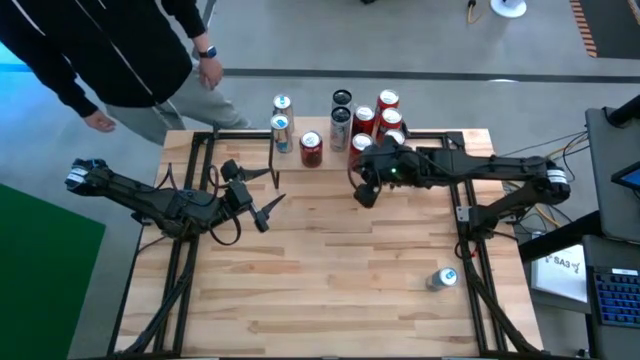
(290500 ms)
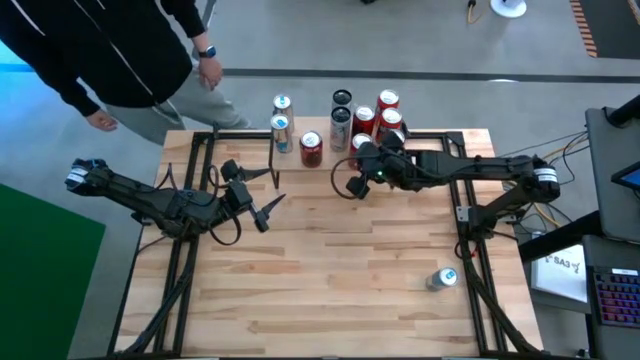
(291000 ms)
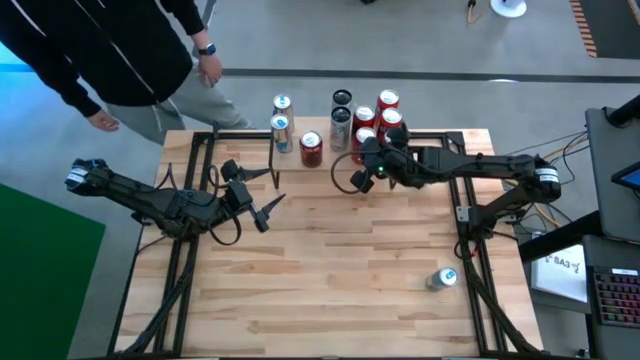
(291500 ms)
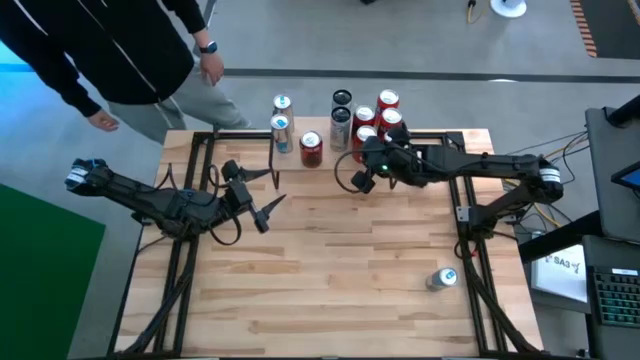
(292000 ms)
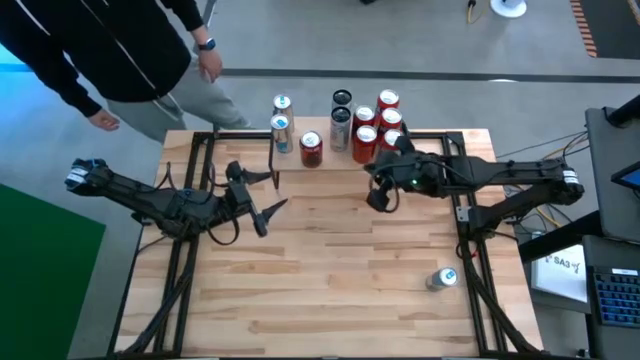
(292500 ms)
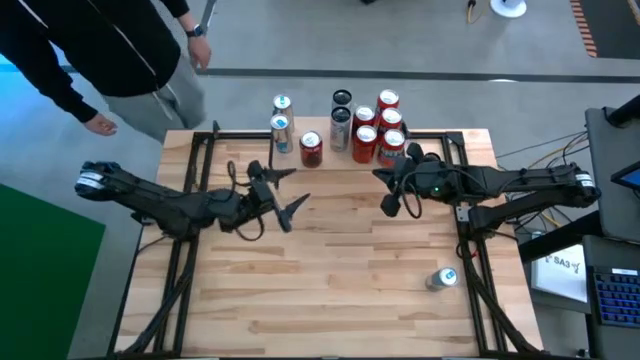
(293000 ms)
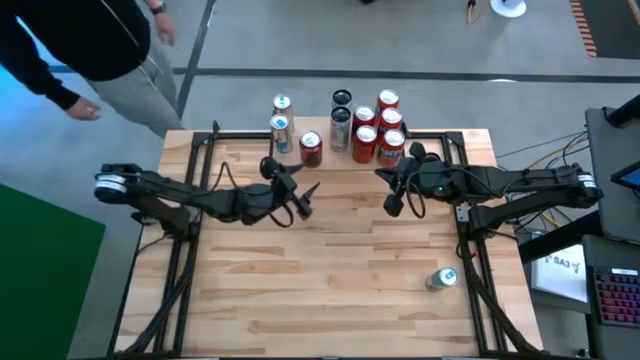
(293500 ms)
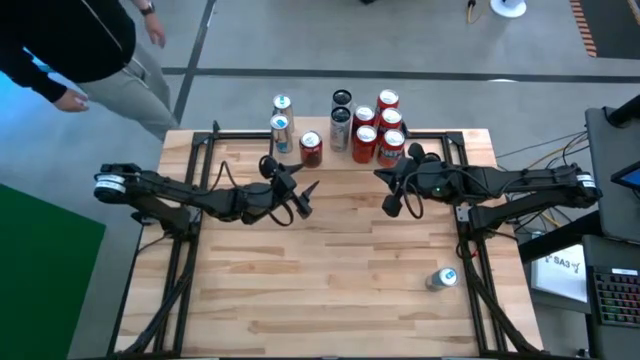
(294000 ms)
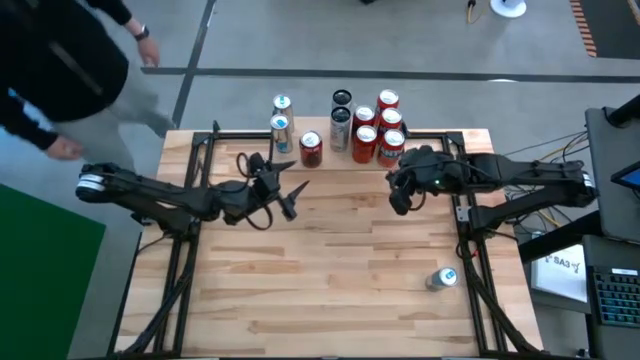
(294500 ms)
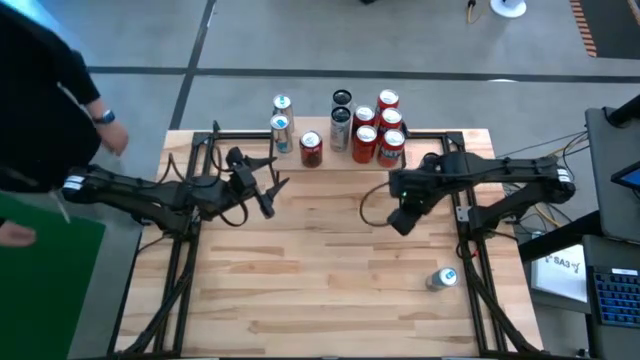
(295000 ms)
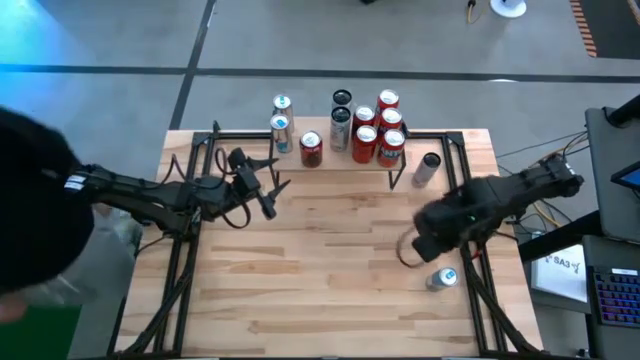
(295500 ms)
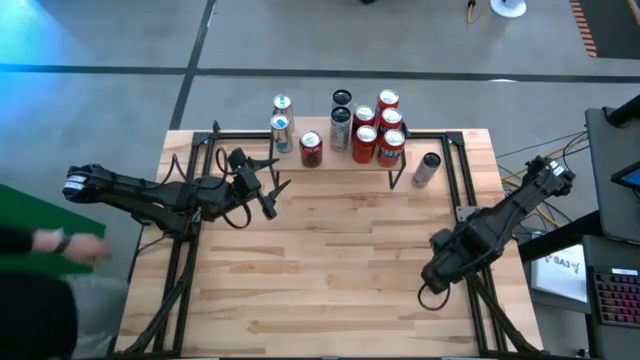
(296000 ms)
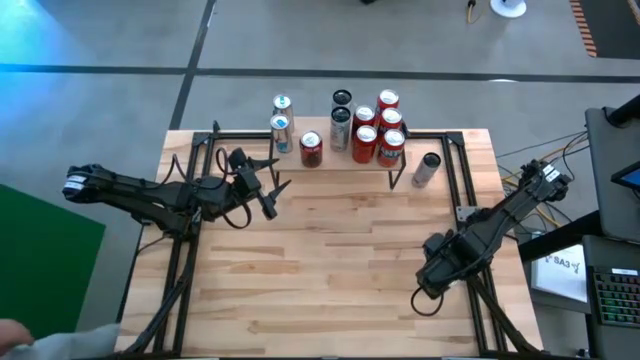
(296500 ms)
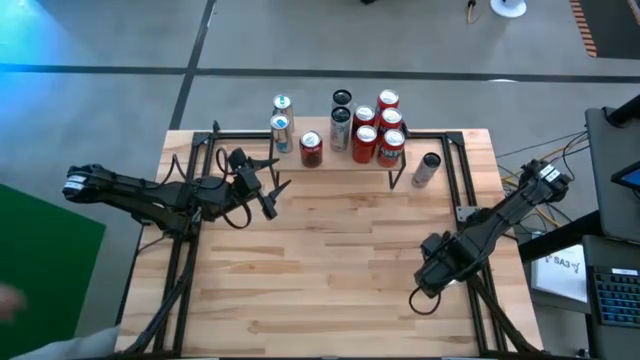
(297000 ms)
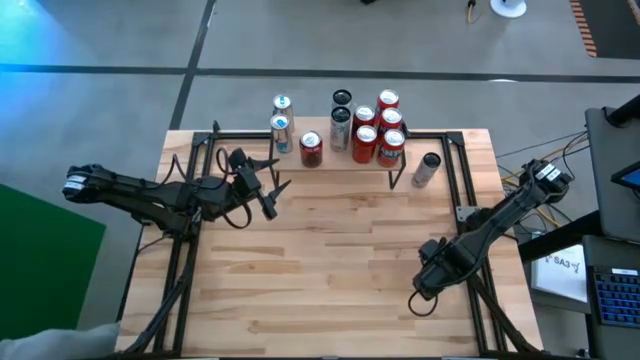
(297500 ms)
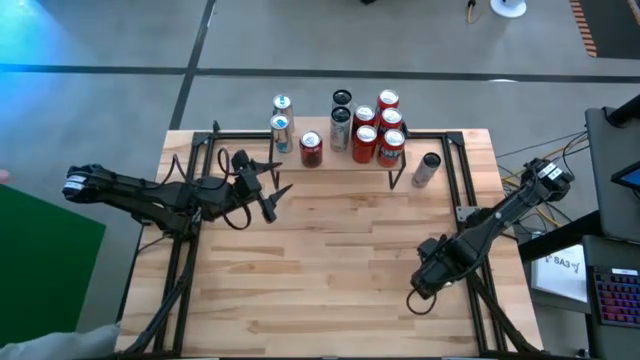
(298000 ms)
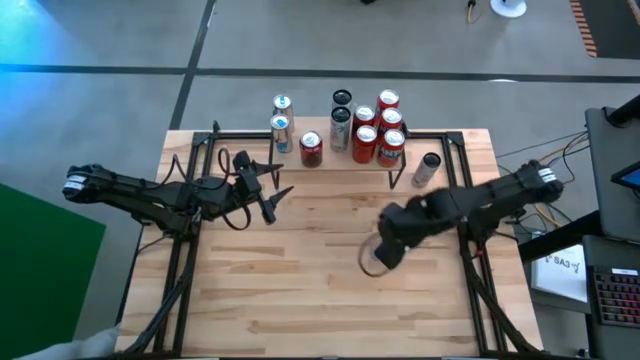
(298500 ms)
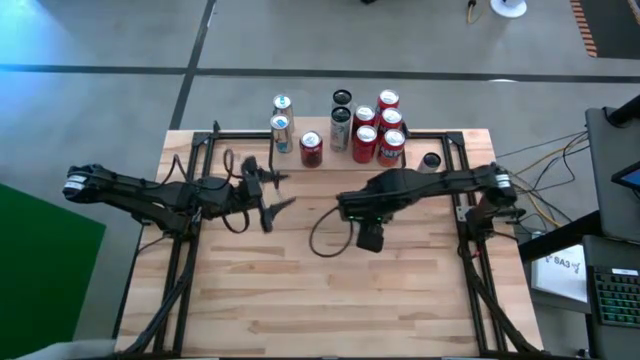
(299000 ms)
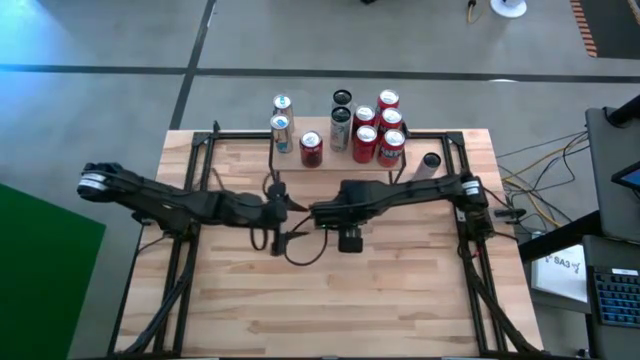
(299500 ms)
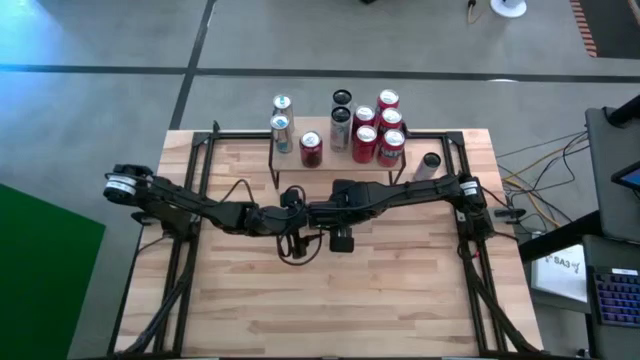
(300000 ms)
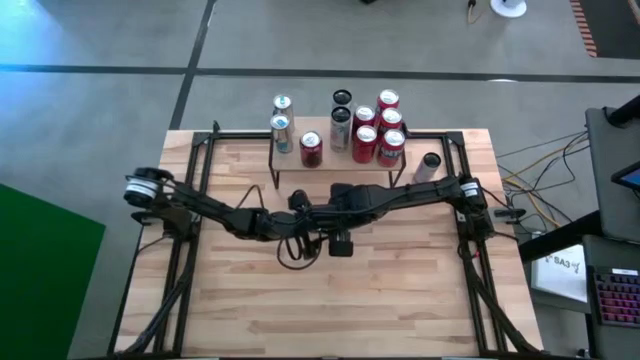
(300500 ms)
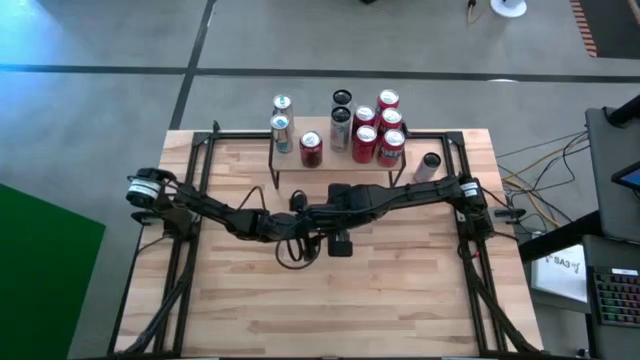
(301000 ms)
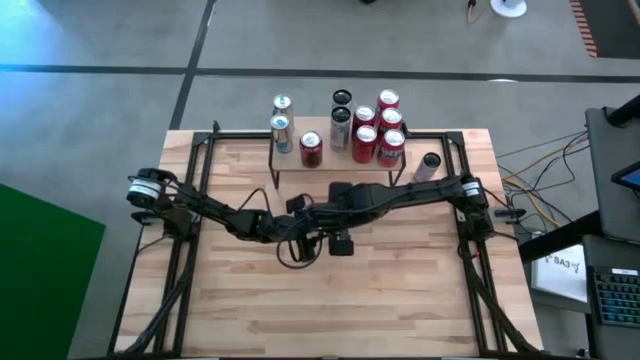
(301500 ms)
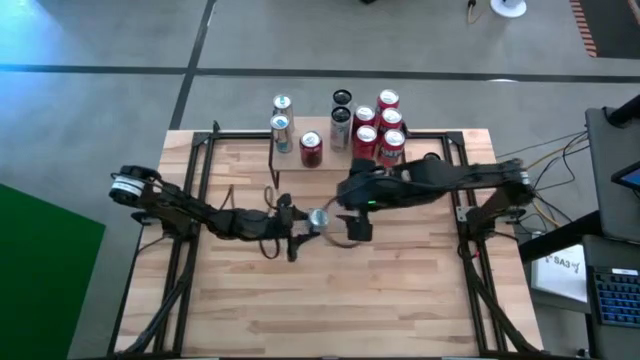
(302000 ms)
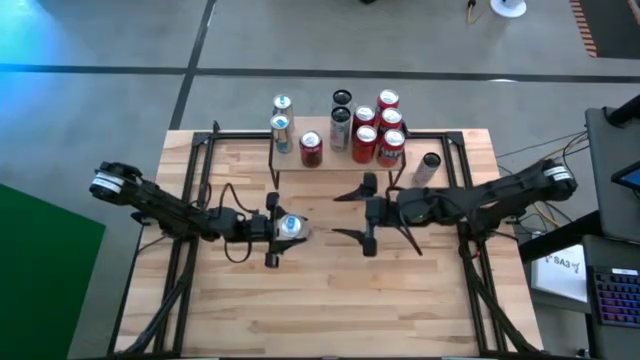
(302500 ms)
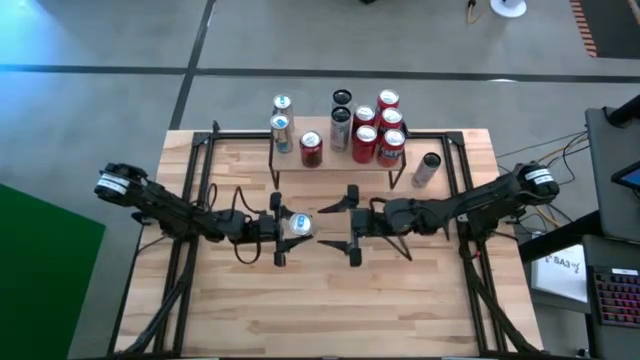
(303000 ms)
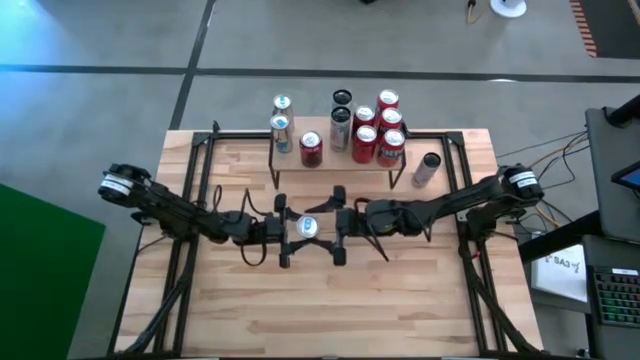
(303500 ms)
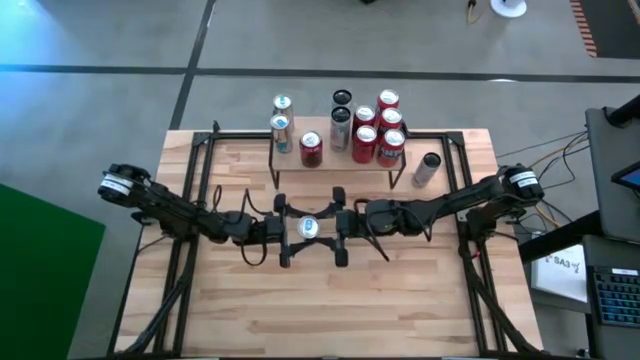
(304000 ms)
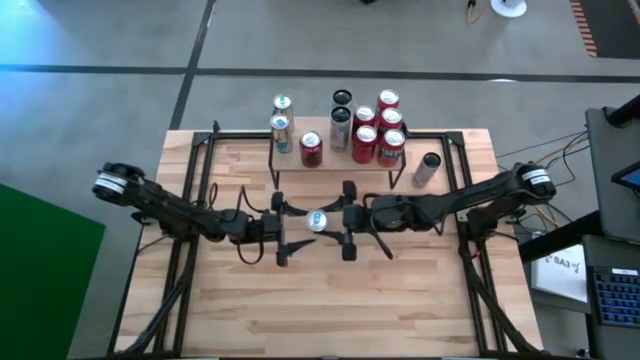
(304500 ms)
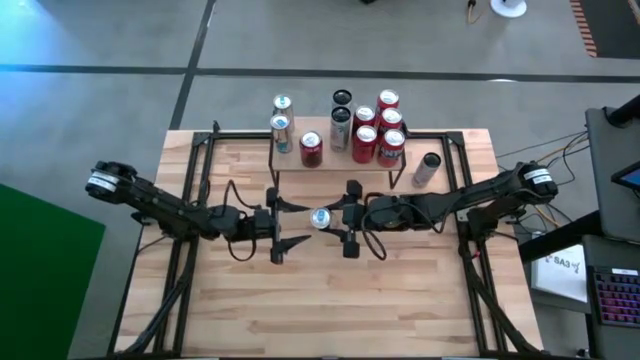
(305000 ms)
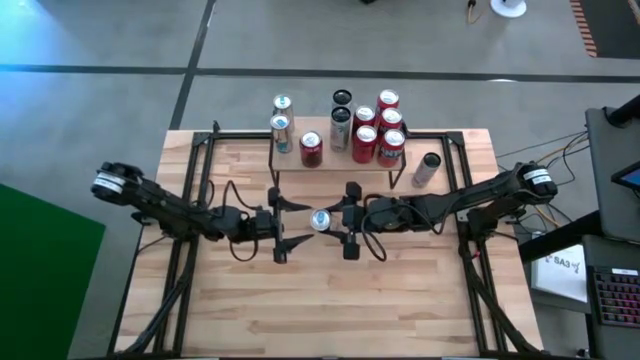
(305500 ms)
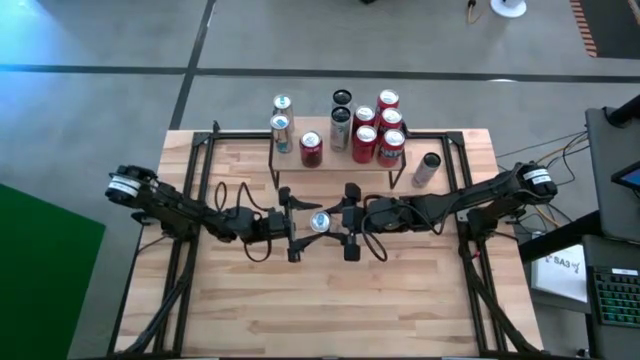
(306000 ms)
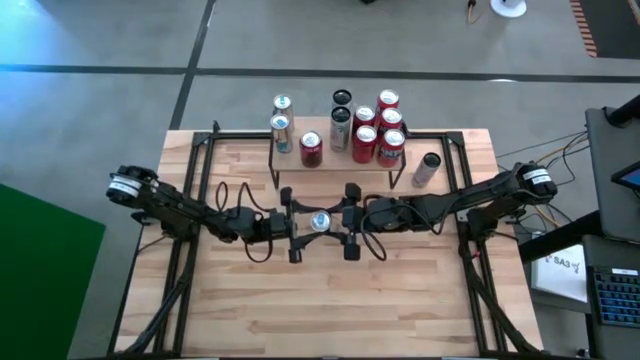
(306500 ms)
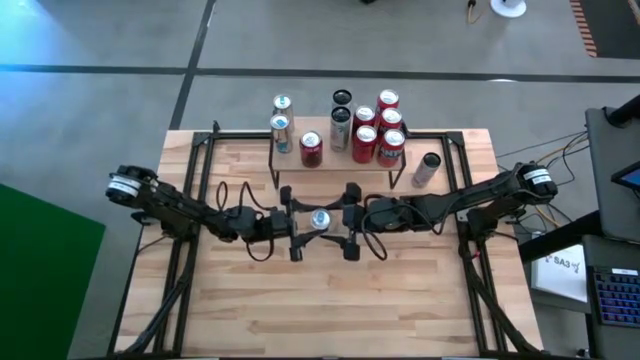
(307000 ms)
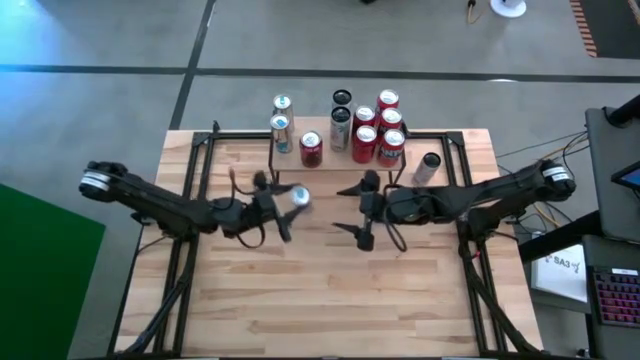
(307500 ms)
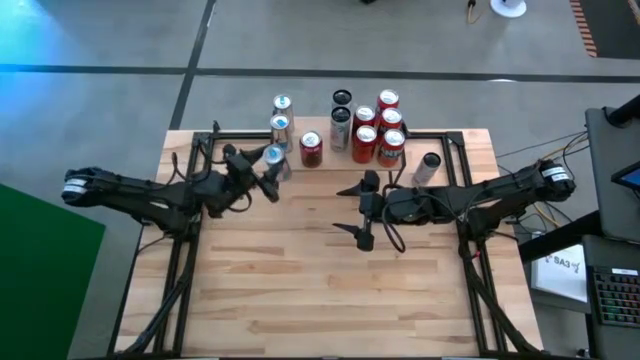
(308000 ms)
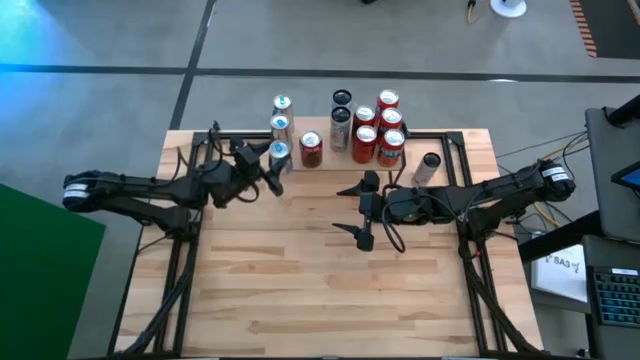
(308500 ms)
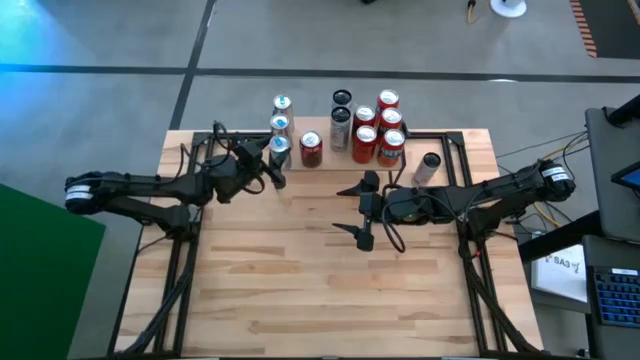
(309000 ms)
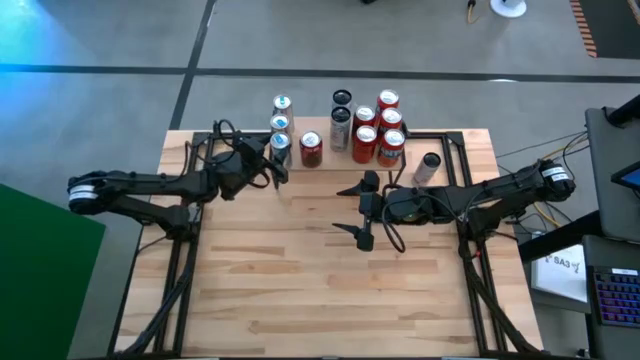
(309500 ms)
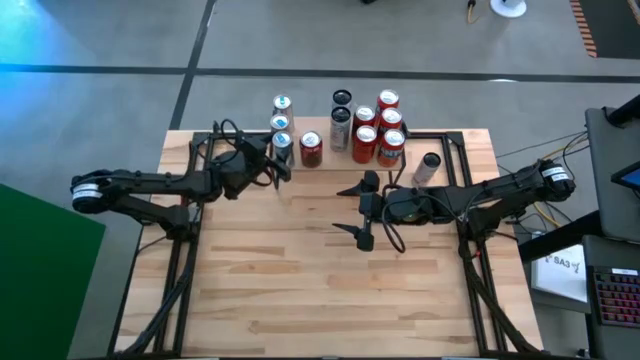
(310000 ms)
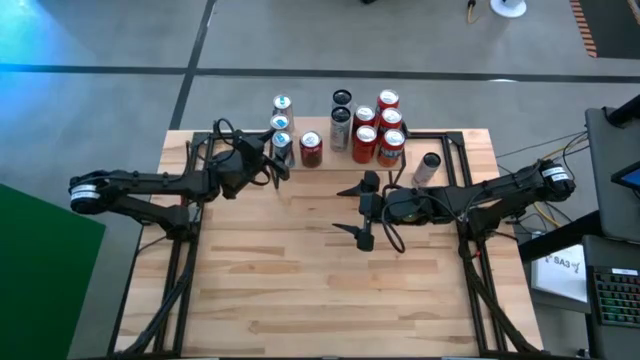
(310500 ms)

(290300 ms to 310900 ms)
Task: Place canned beverage on shelf
Put the blue soda can on the shelf

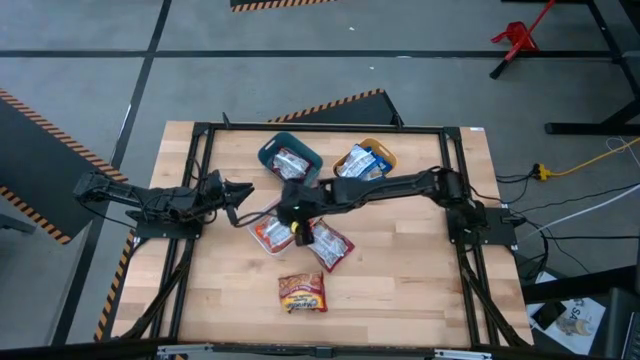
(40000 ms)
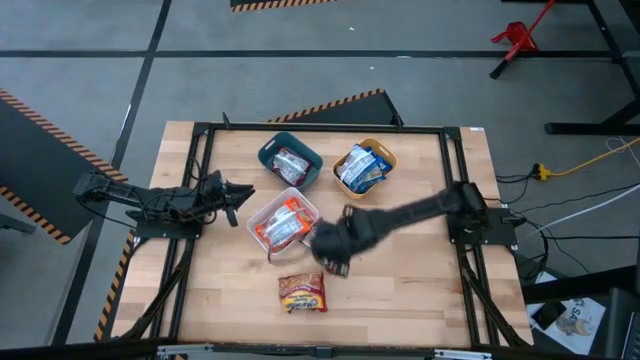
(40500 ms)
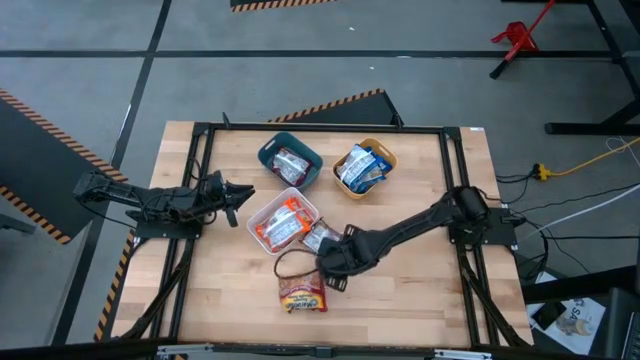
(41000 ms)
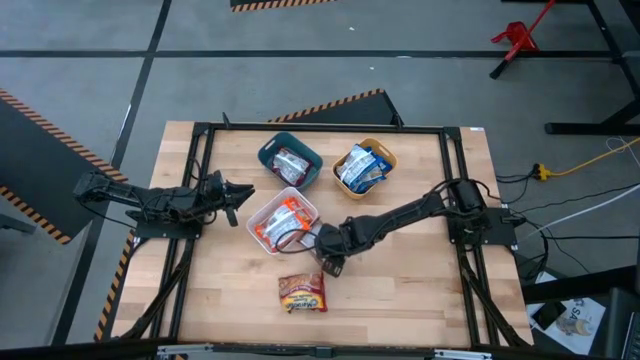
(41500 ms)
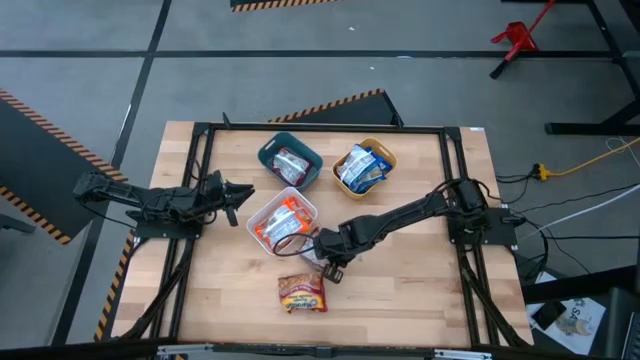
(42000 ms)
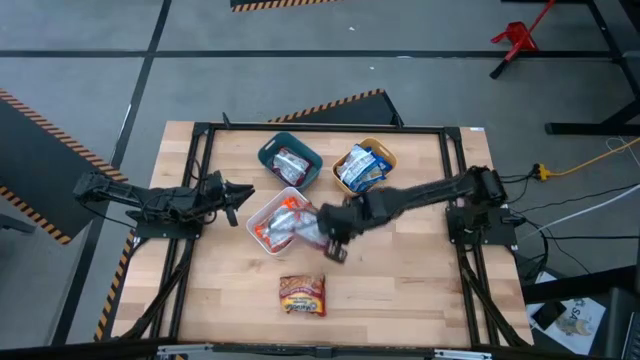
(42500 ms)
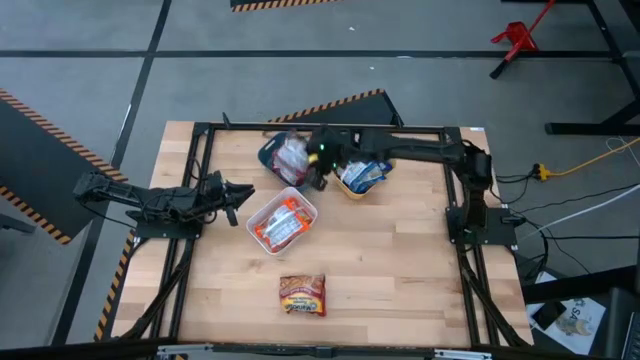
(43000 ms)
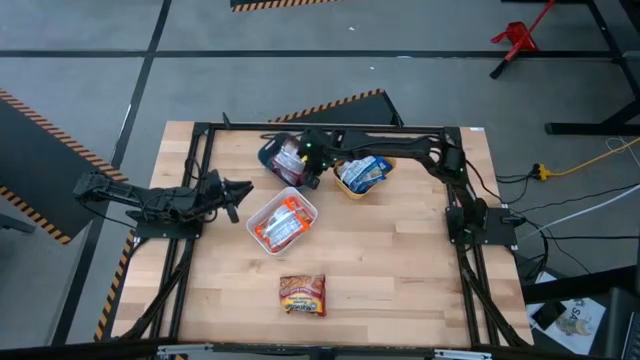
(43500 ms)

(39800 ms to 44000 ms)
Task: Sort Maruchan noodles
Put the top red noodle pack into the blue bin
